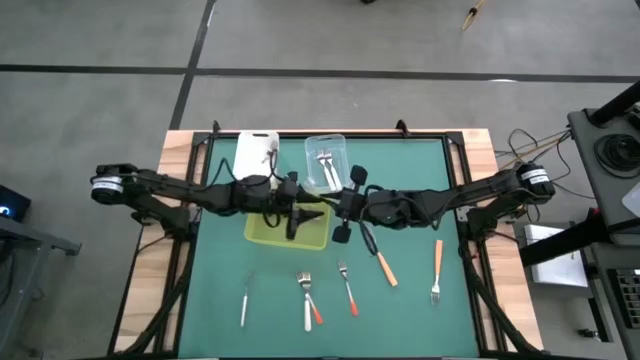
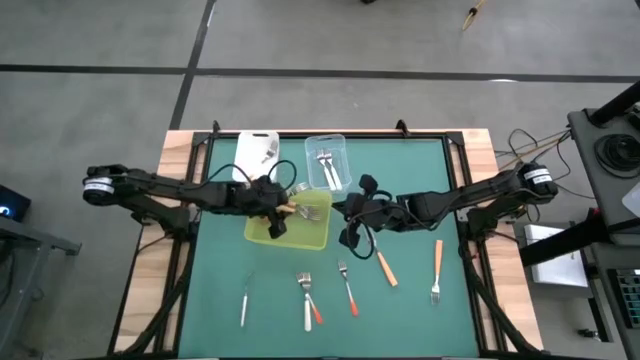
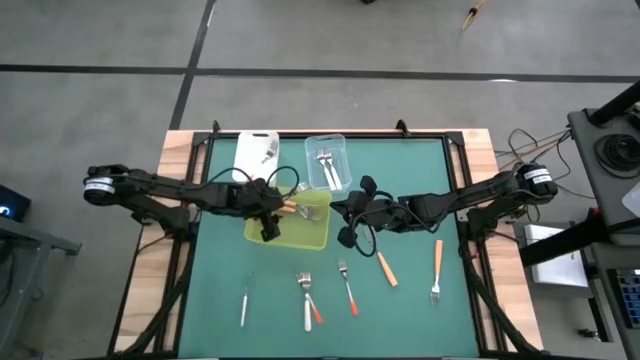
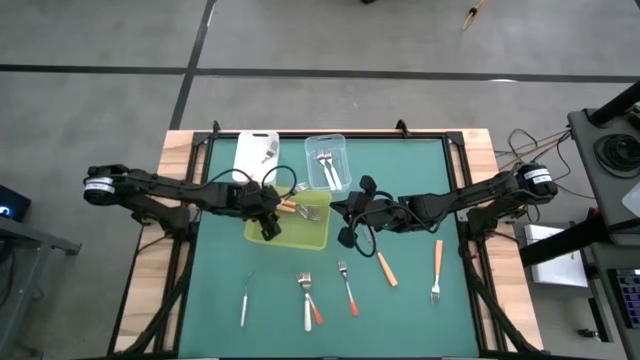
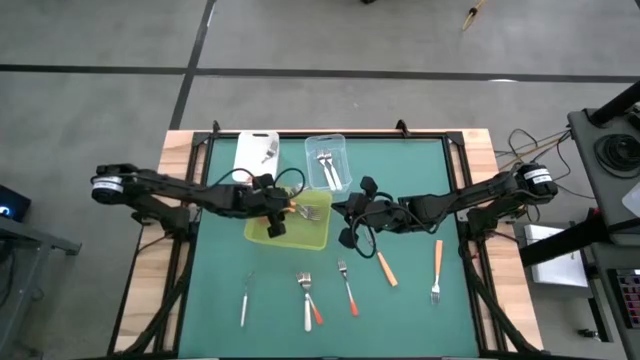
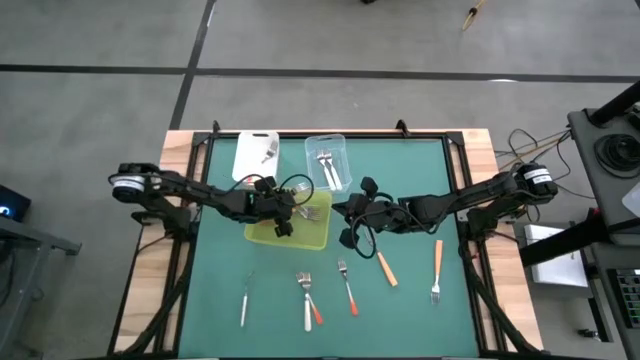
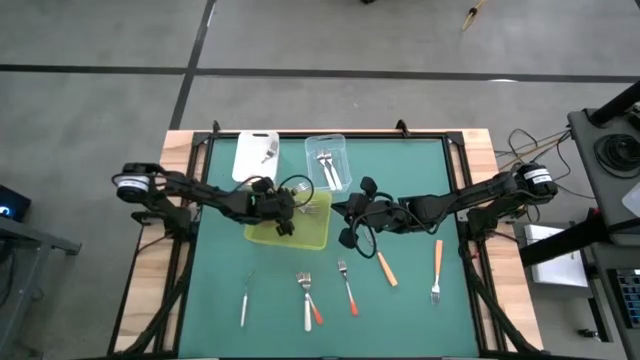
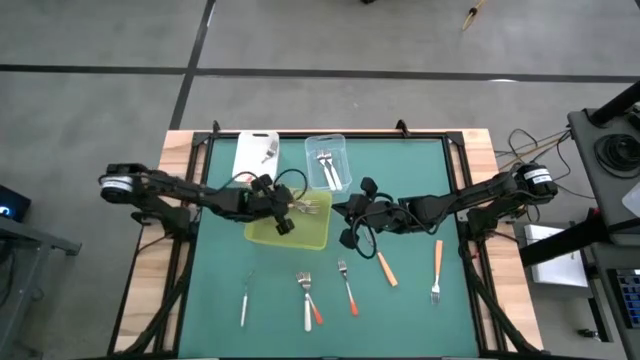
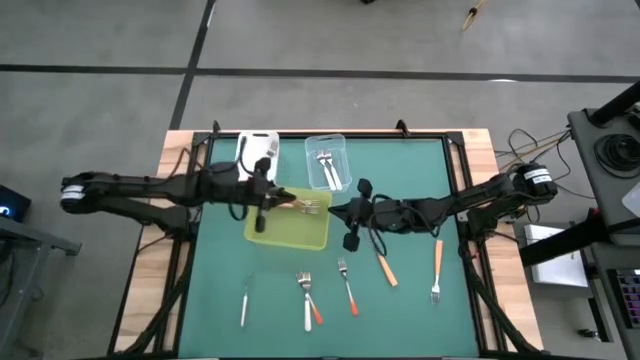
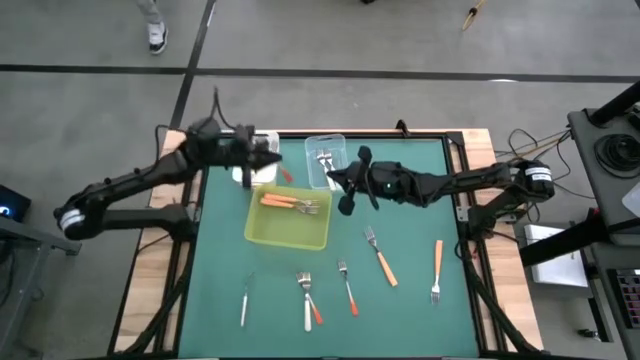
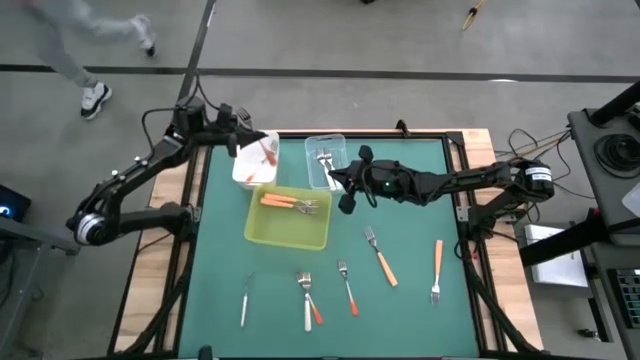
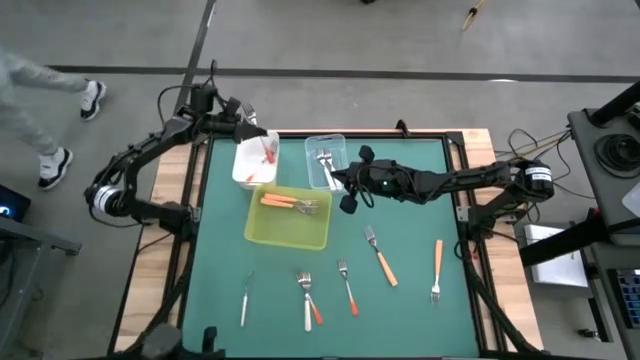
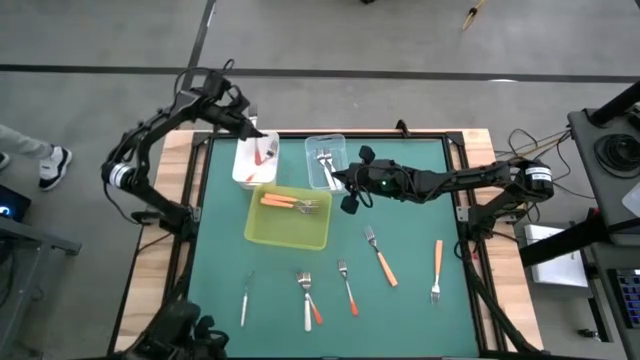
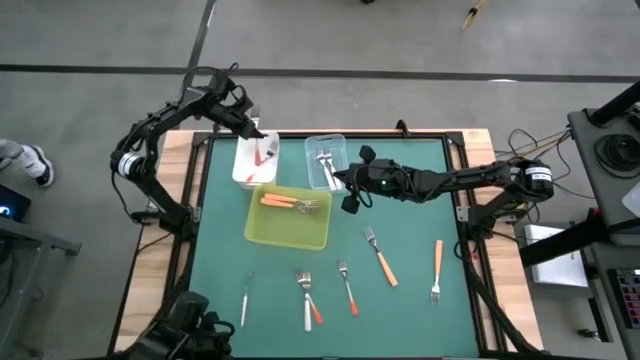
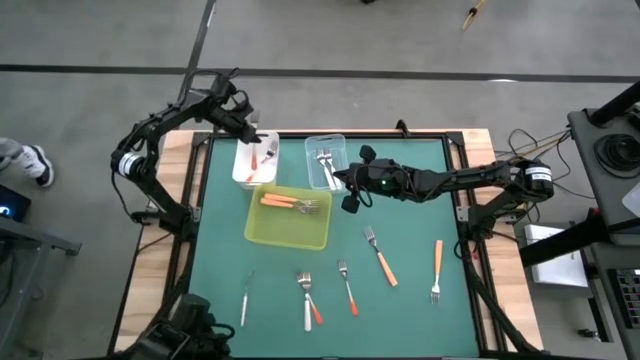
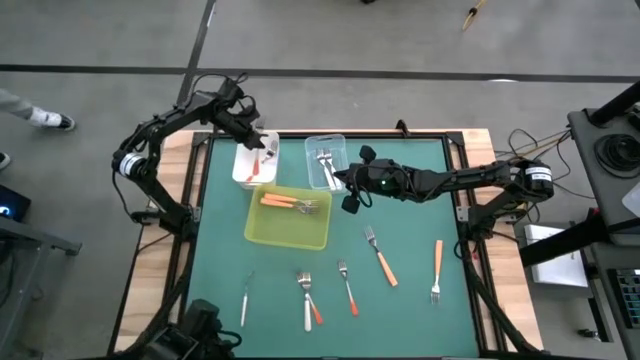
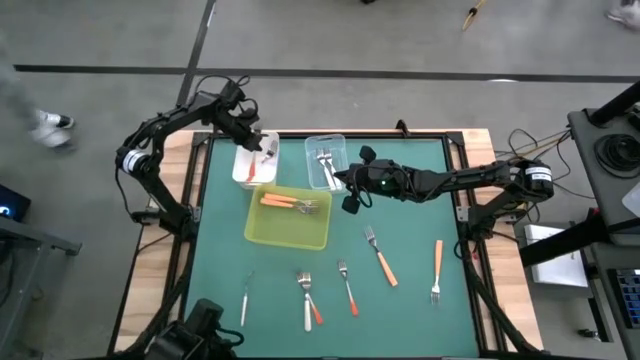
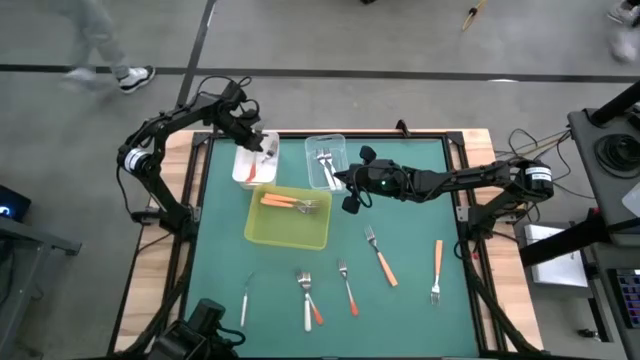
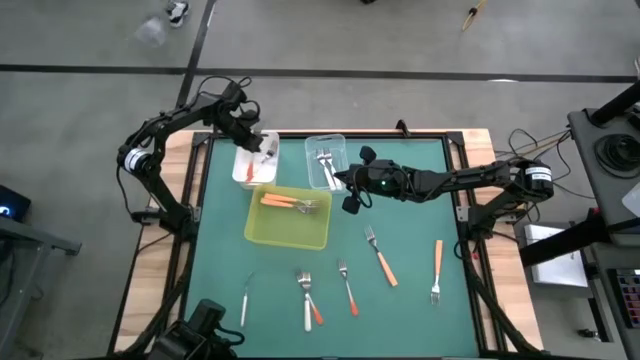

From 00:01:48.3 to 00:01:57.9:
Task: Sort silverware by color (type)
Put the orange fork into the white bin

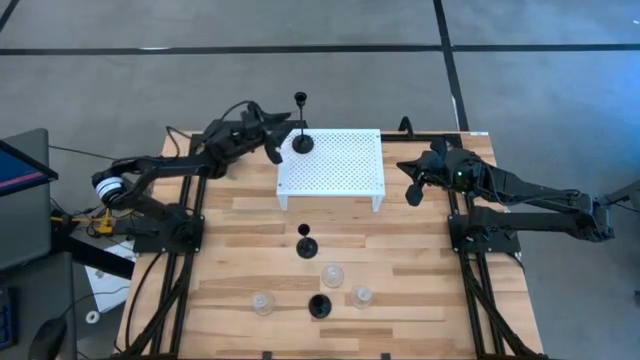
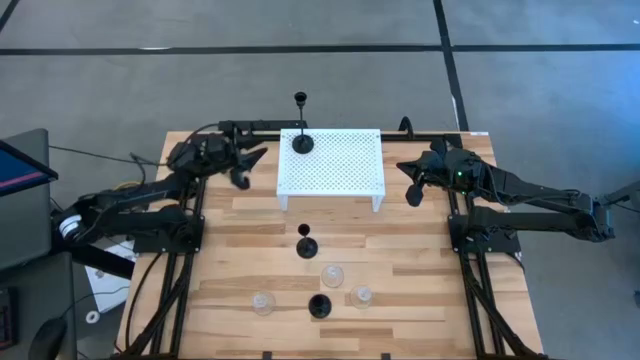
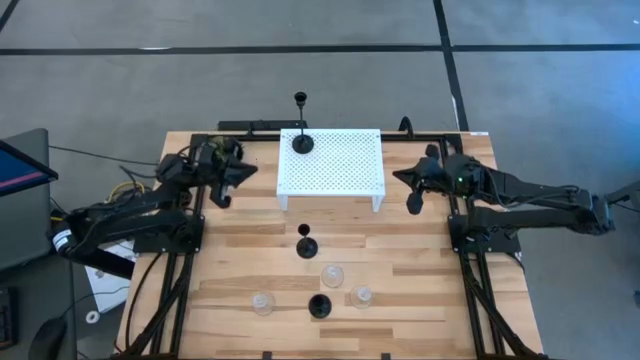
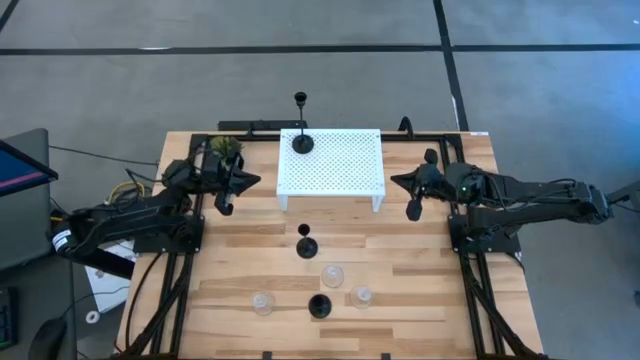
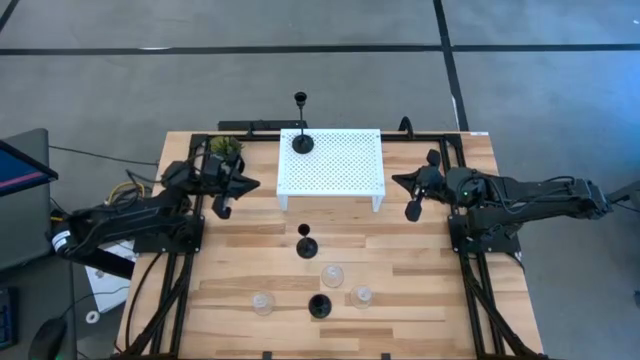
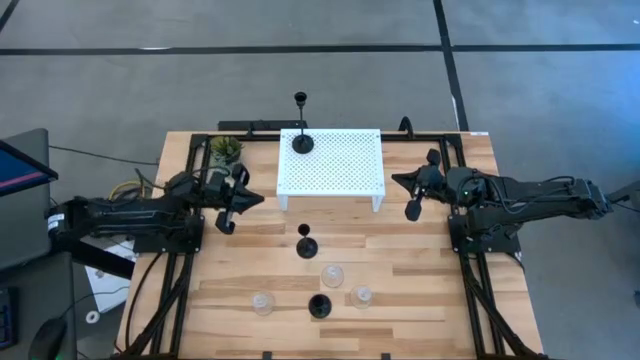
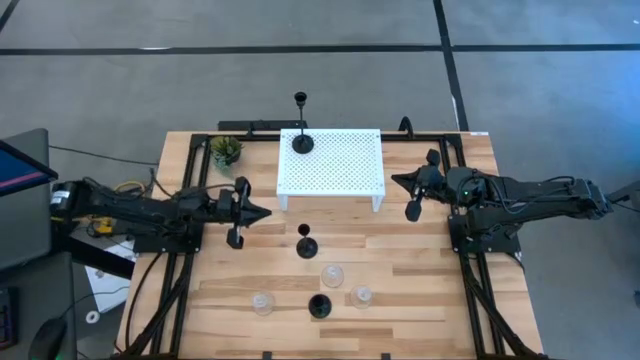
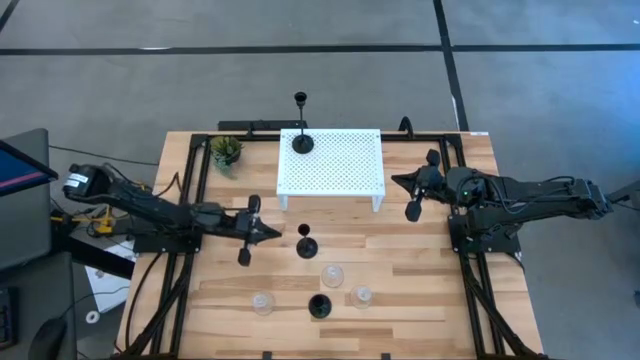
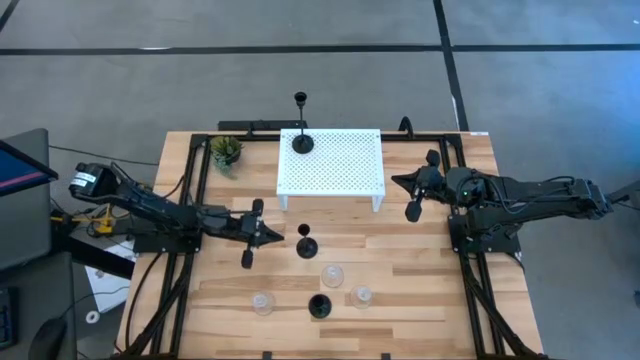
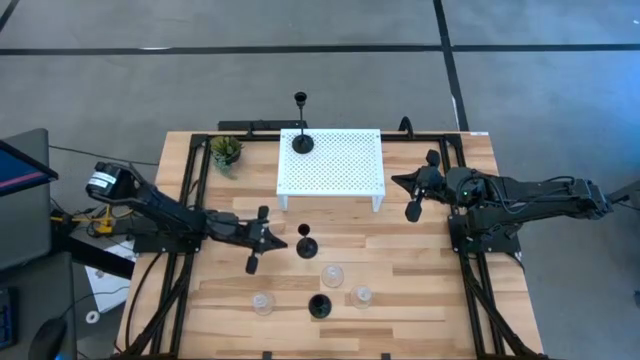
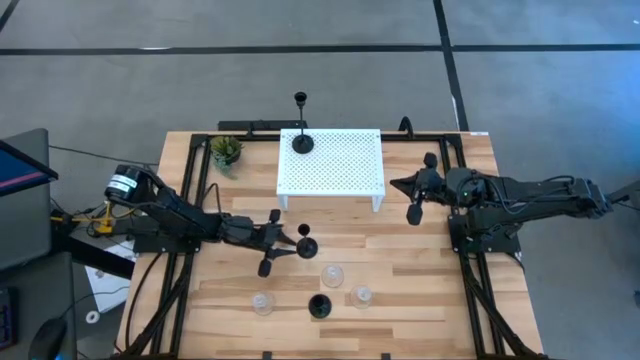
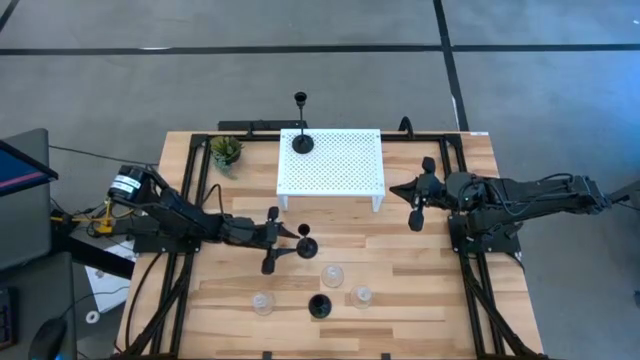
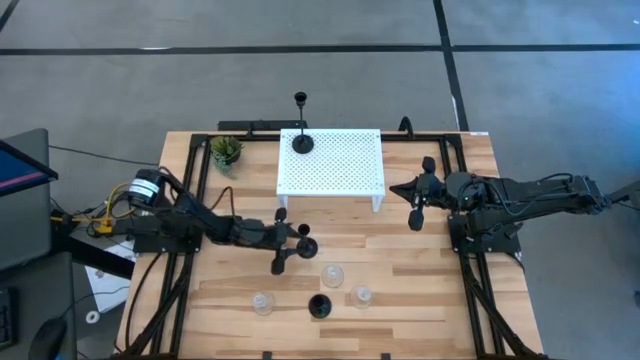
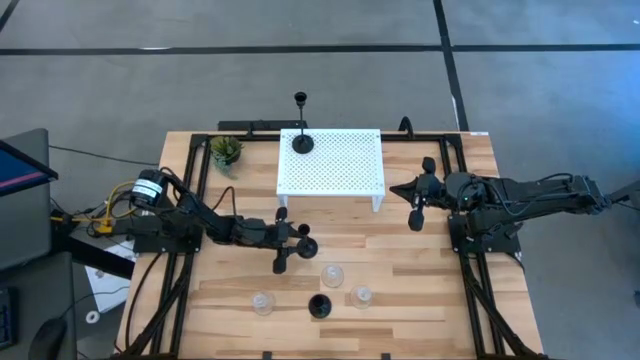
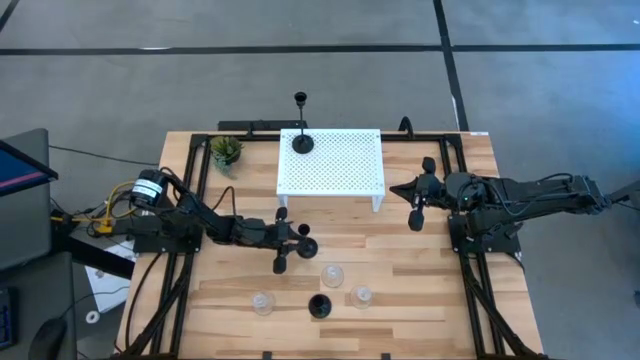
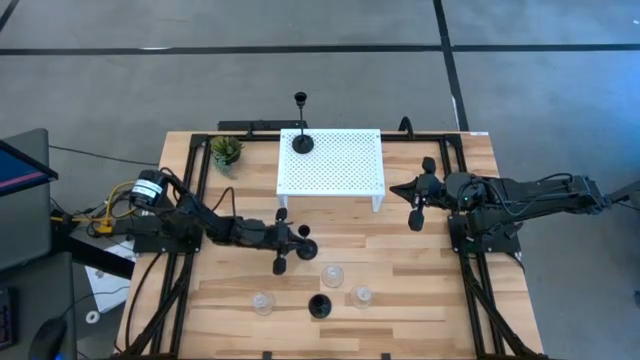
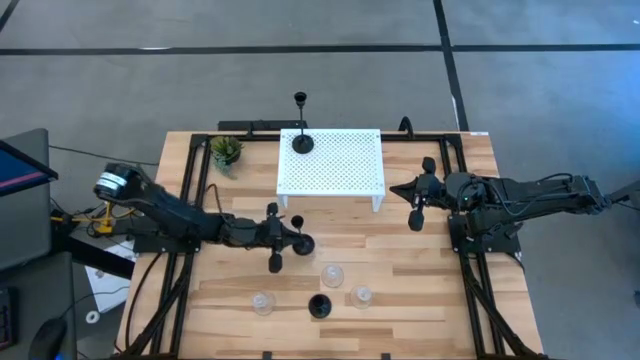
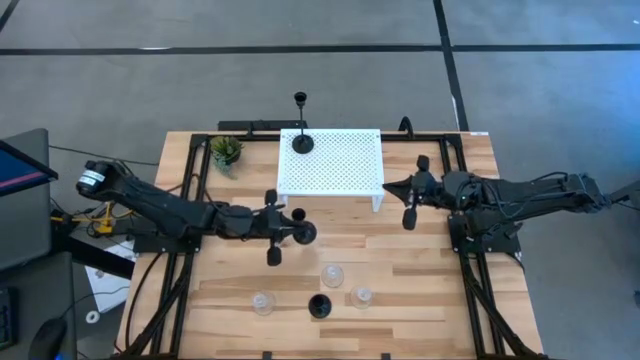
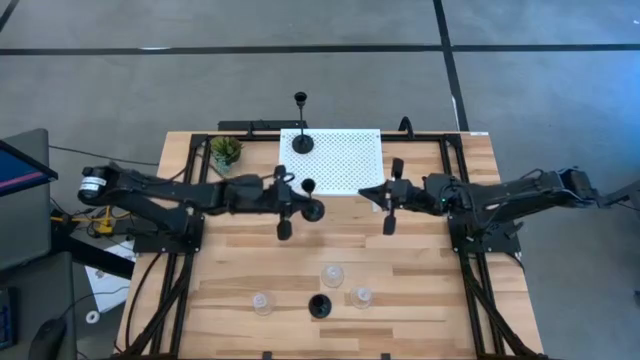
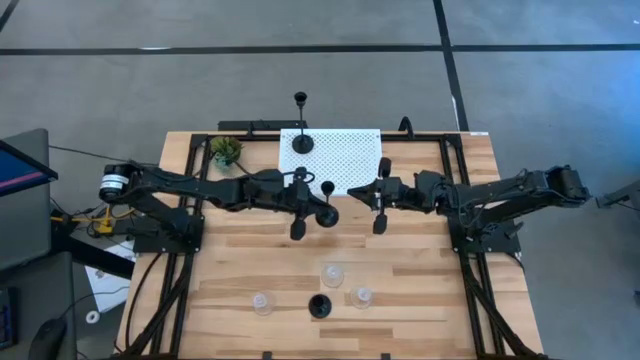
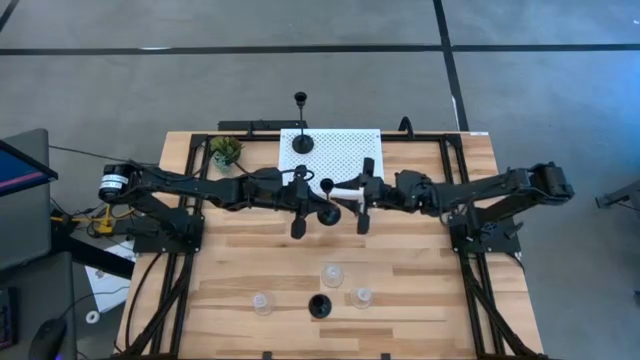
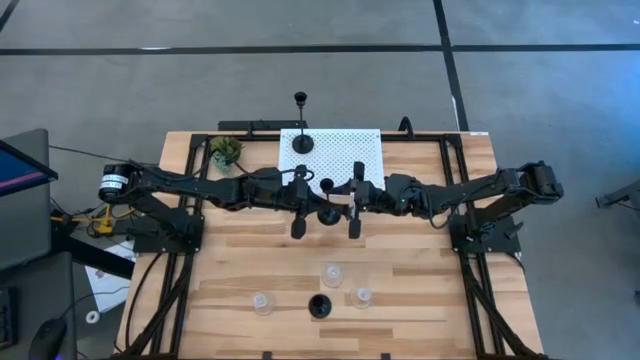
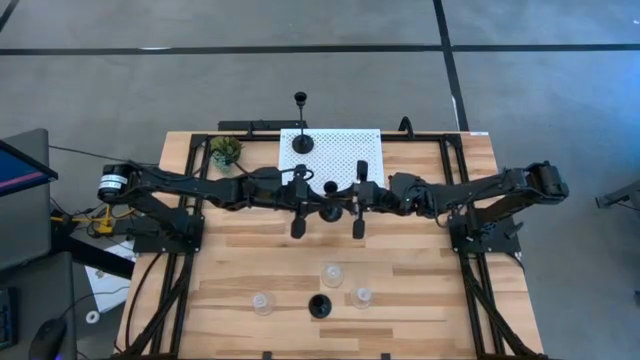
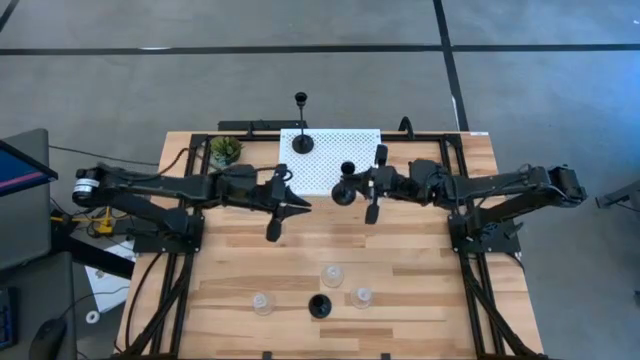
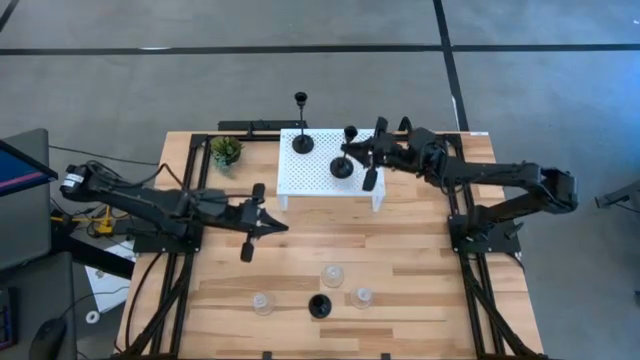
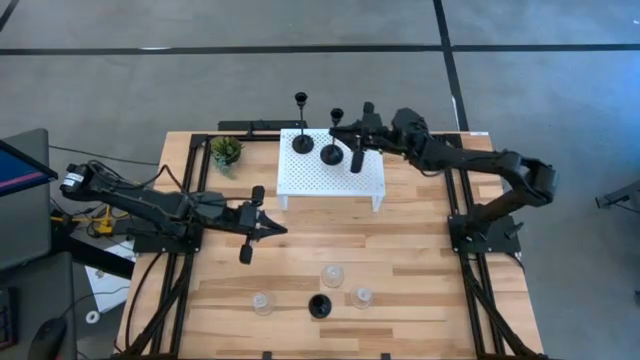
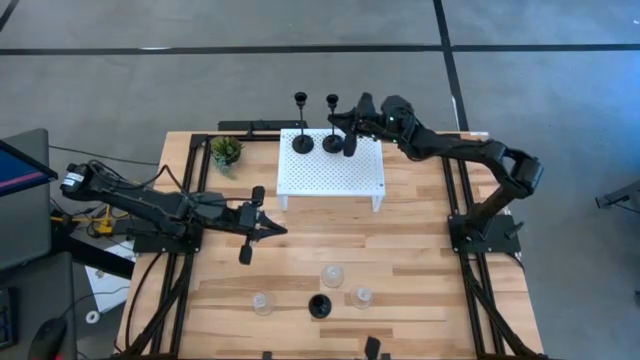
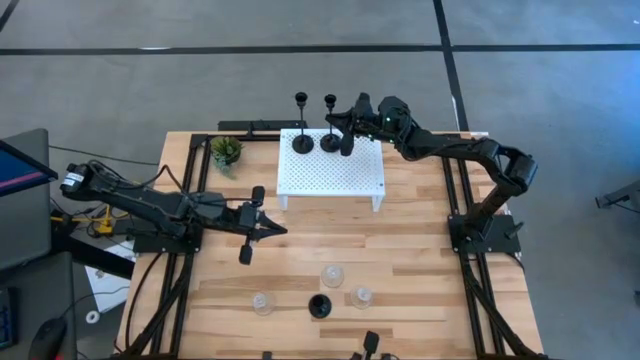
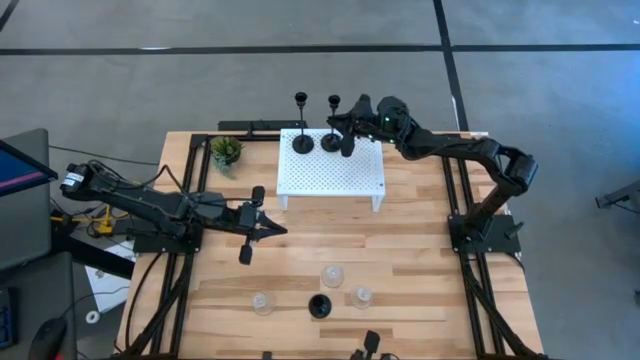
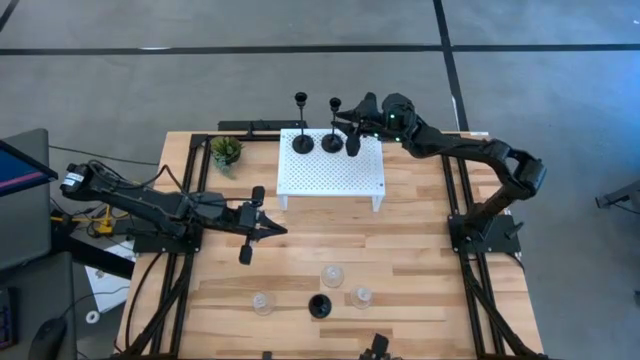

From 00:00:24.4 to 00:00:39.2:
Task: Pick & Place candle stick holders
Put the top black candle holder on the shelf
